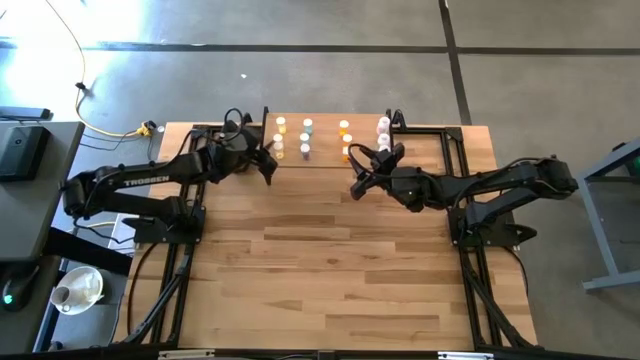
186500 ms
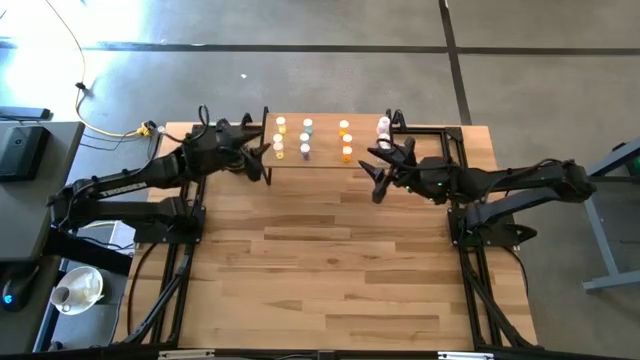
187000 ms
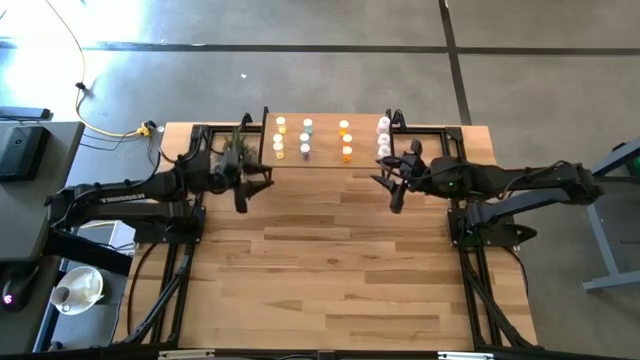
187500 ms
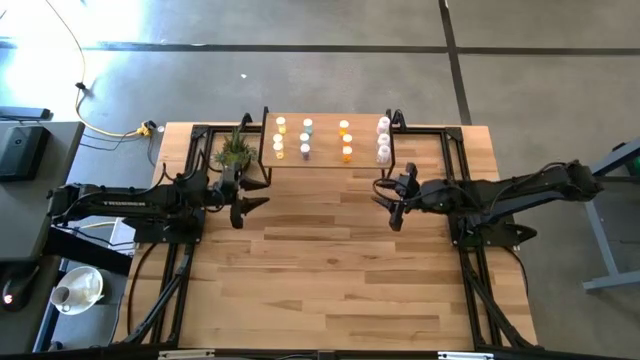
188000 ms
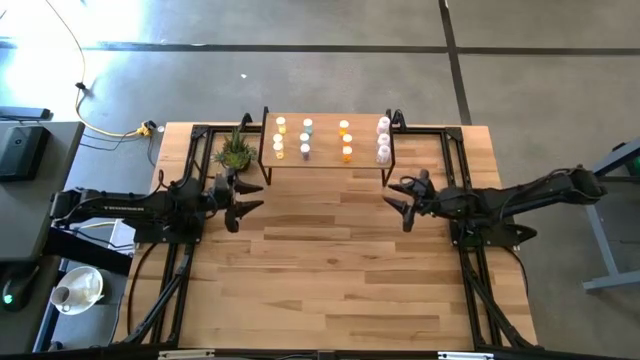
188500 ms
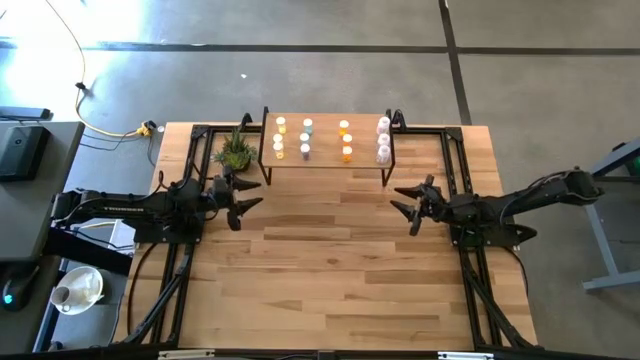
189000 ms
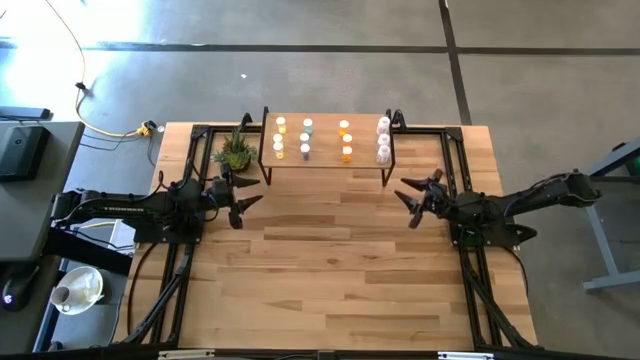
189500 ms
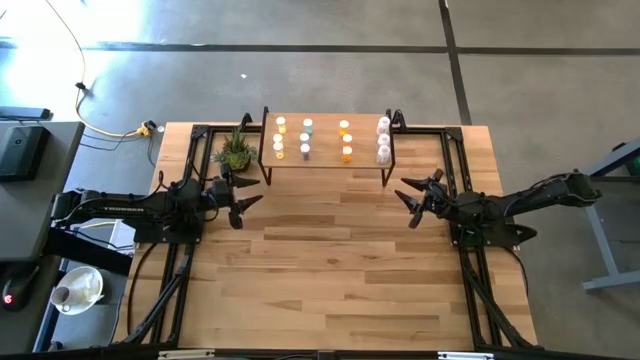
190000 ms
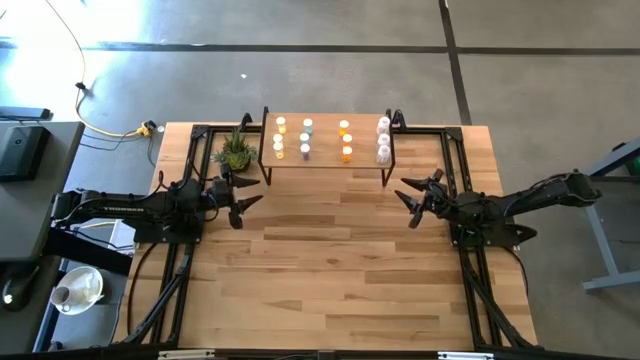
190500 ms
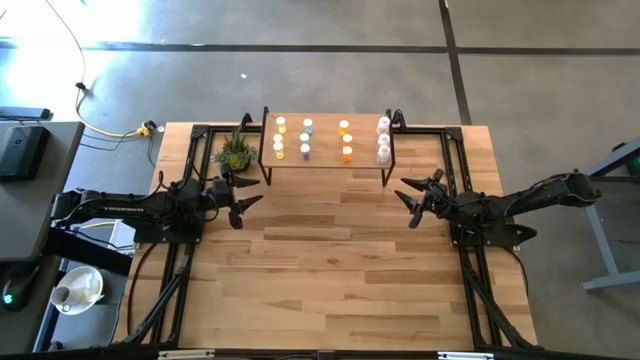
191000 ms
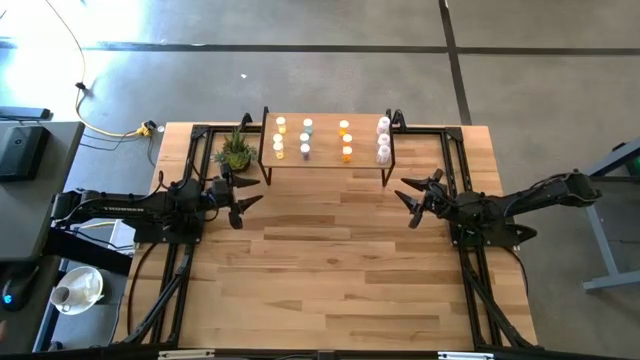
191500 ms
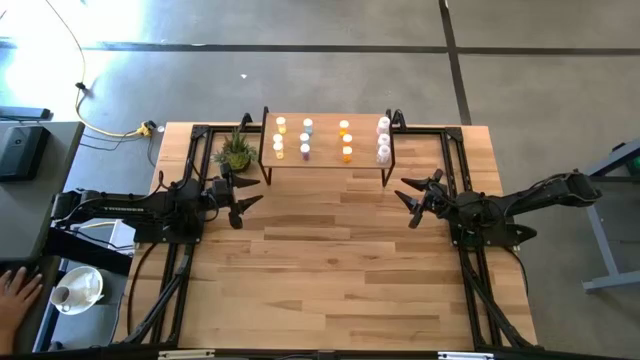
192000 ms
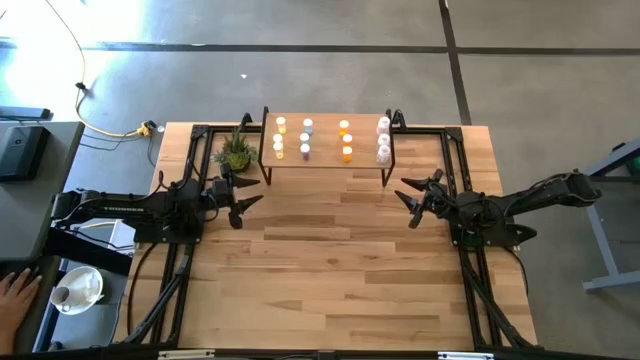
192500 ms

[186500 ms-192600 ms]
Task: Pick and place medicine bottles onto shelf by color
Return to Home Position
